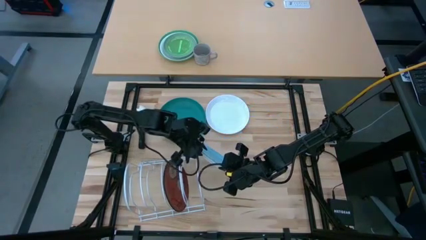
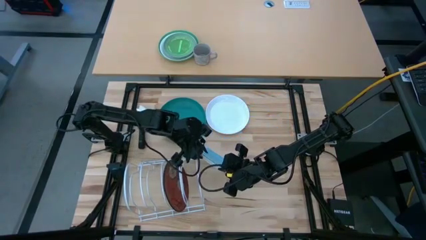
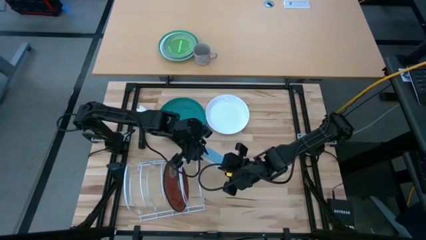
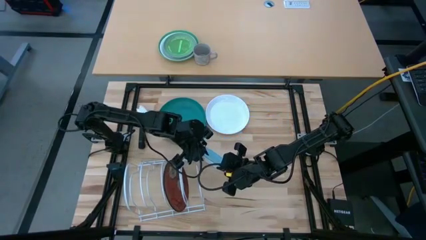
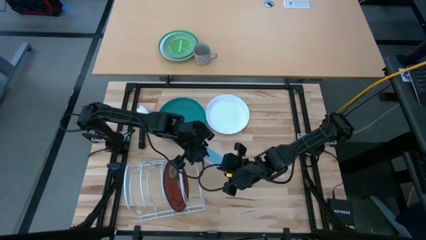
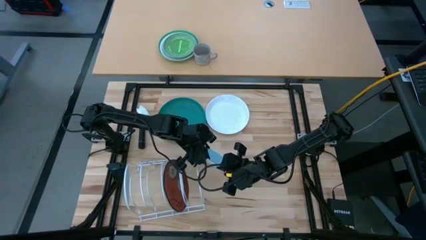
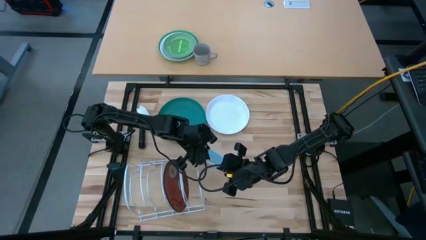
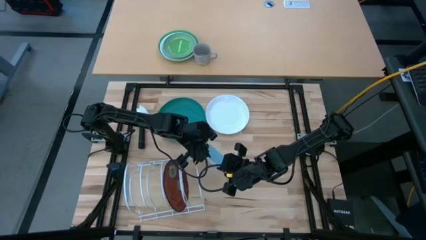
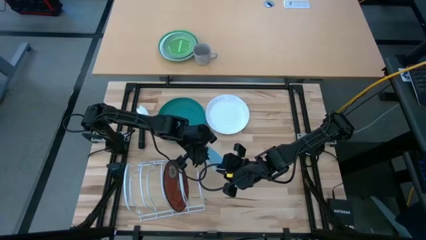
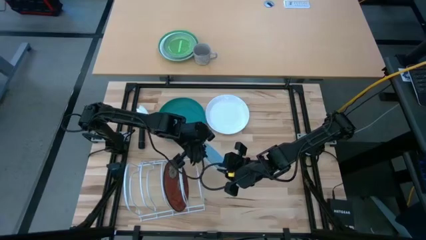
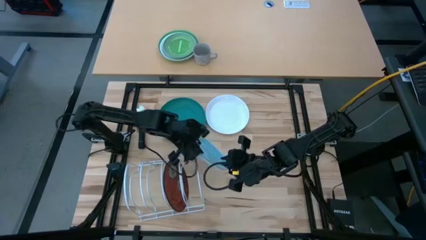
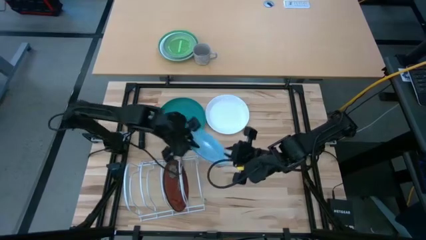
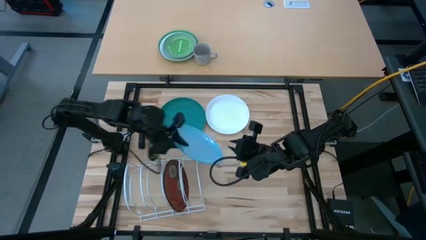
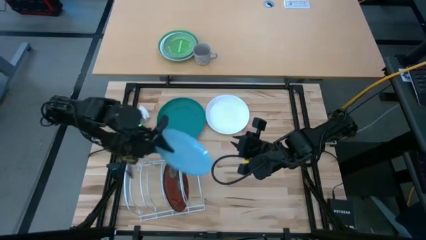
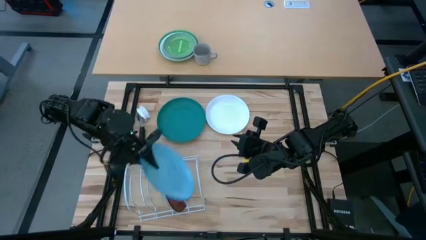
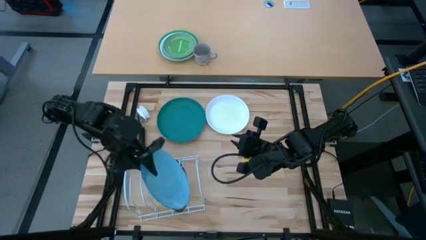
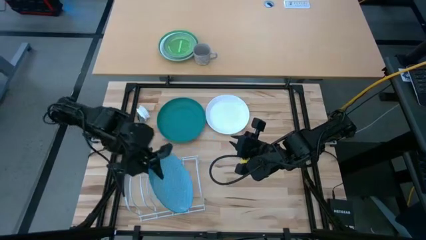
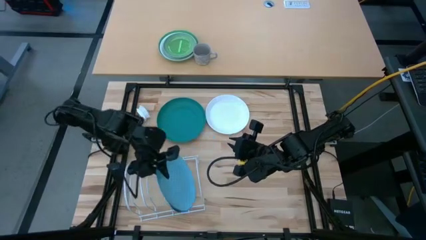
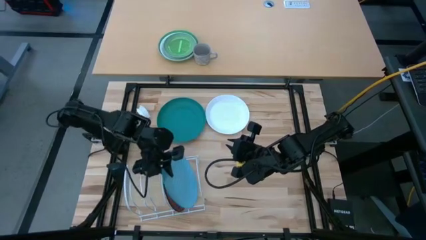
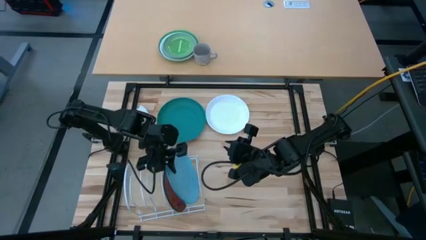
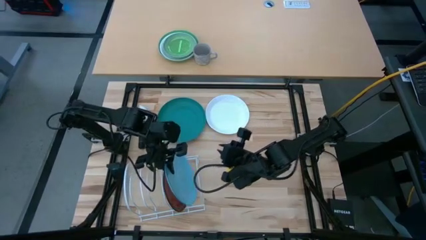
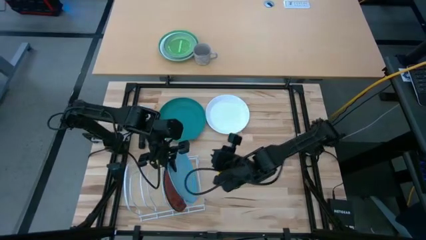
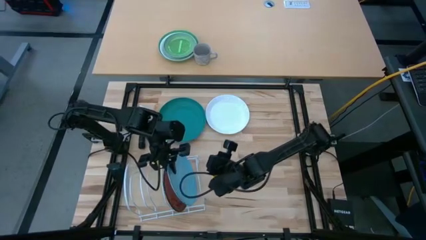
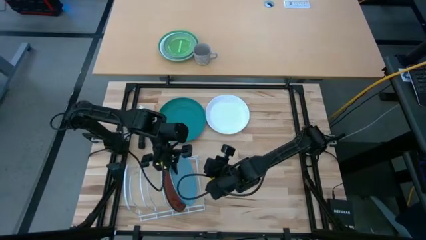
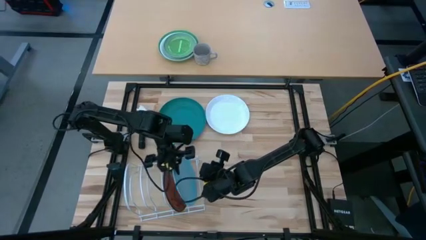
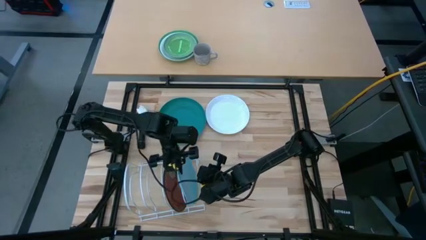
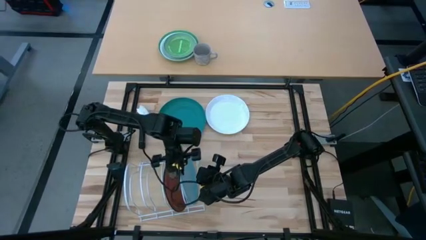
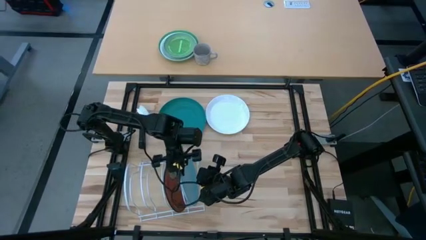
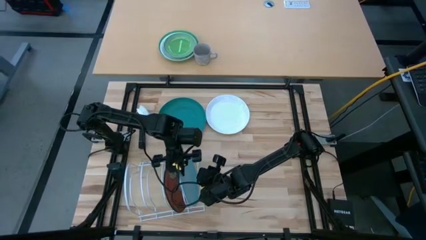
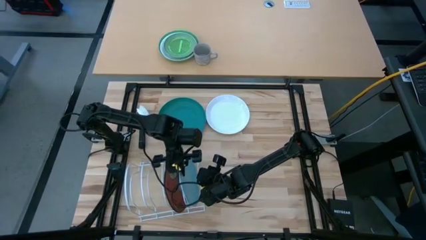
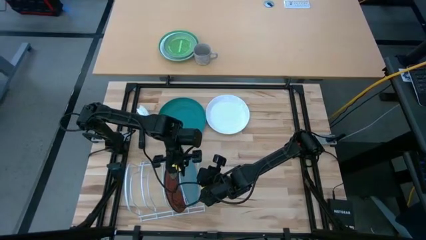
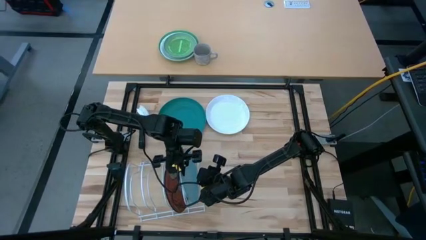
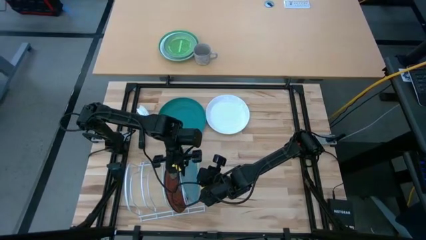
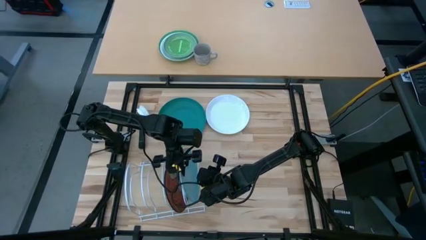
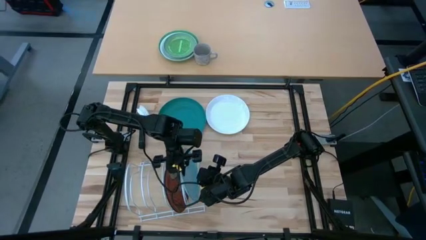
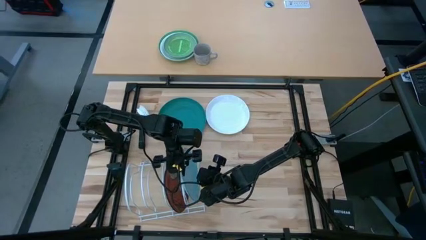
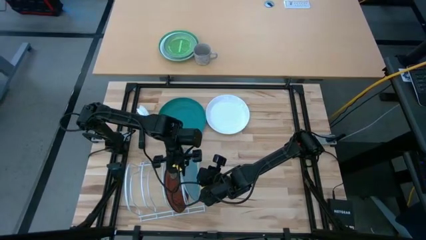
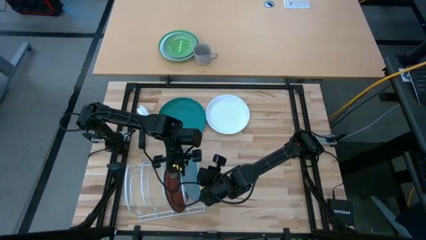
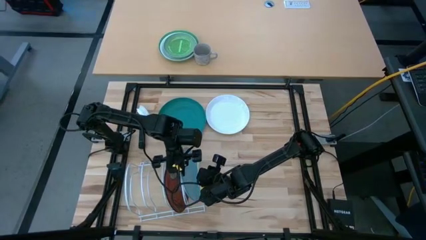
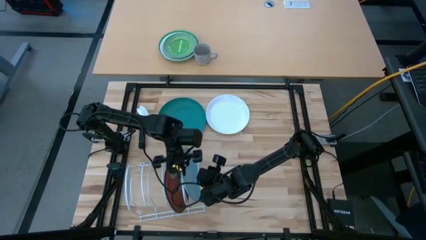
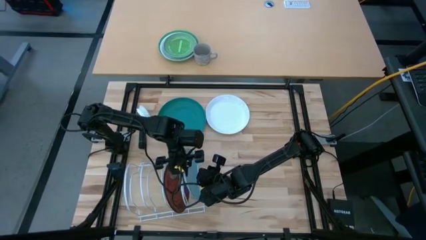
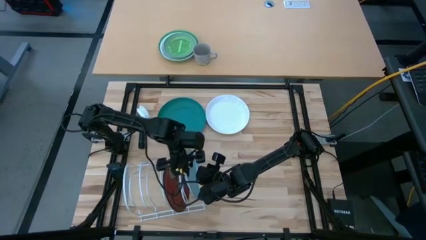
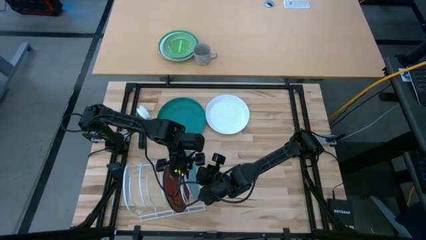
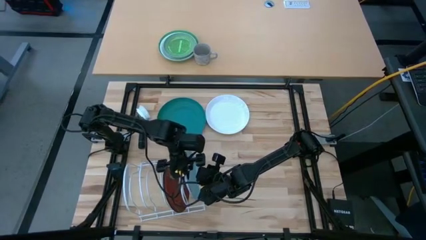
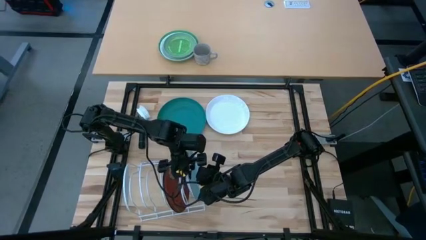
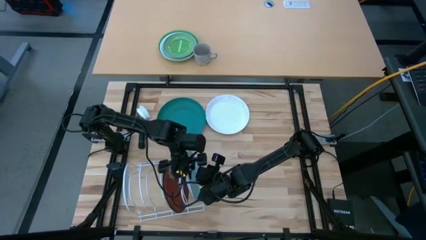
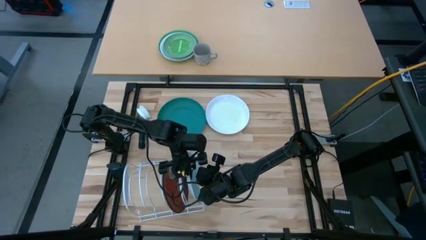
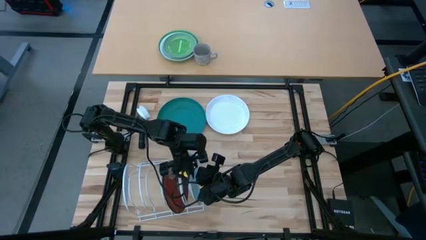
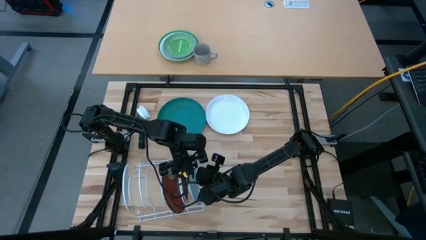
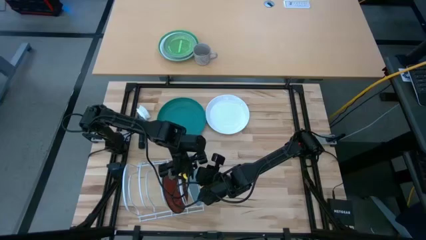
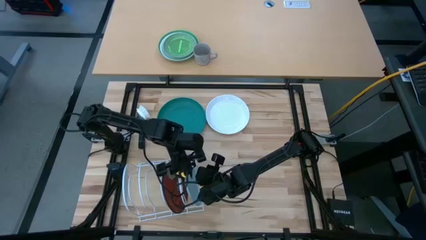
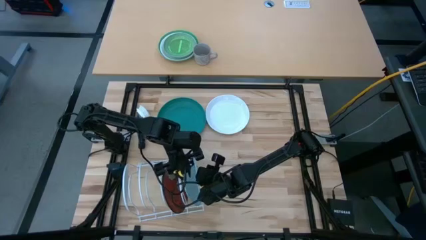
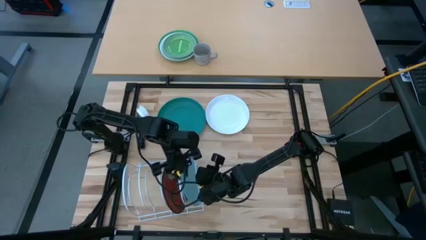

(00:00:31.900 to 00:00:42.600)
Task: Sort dishes
Put the light blue plate into the dish rack

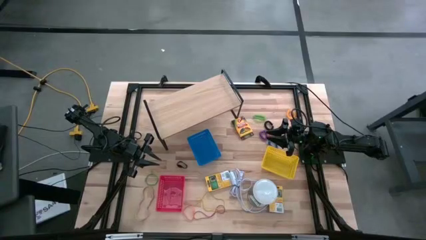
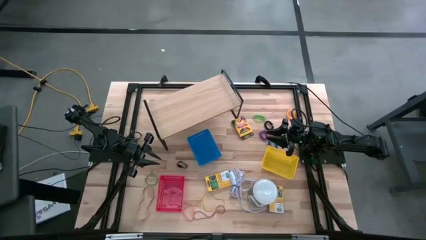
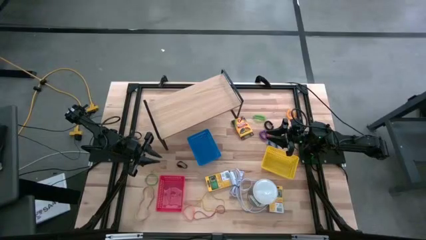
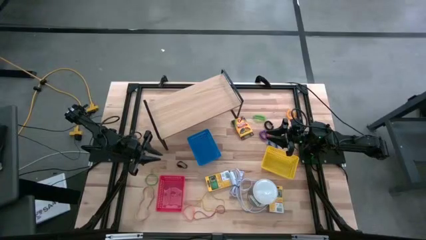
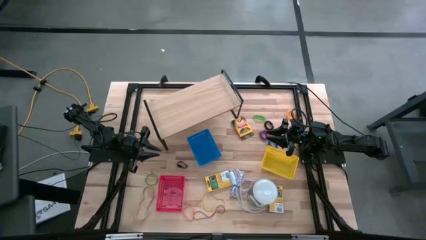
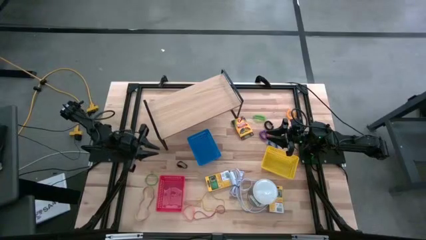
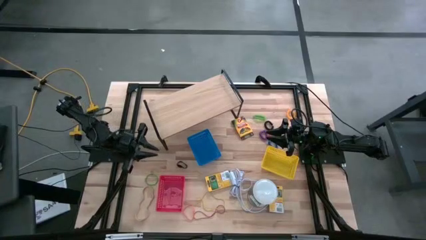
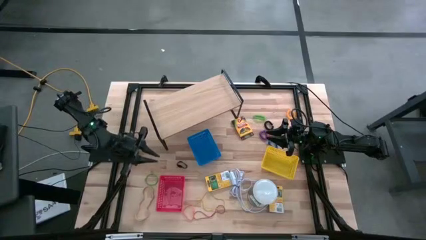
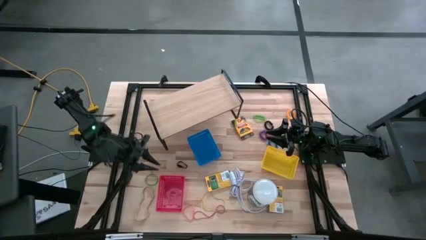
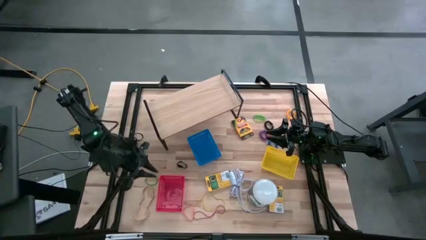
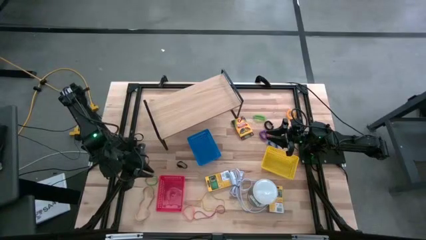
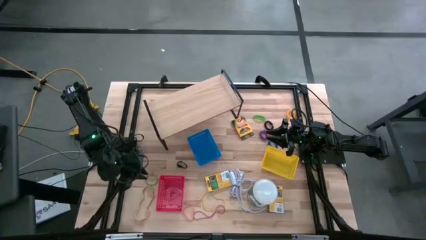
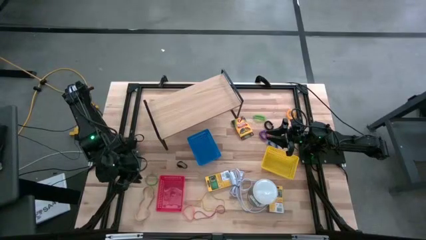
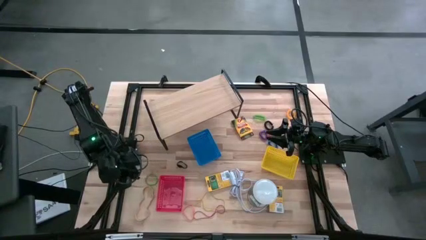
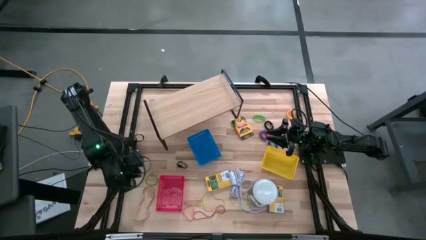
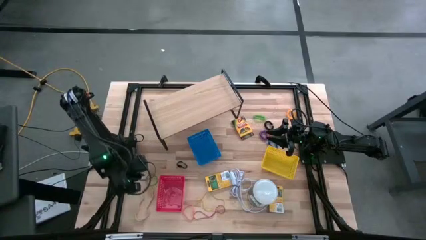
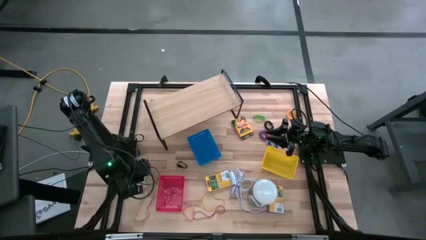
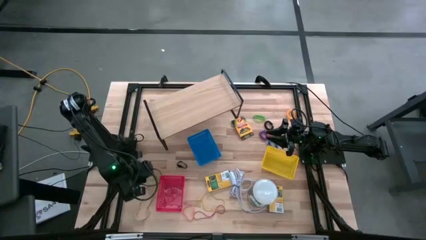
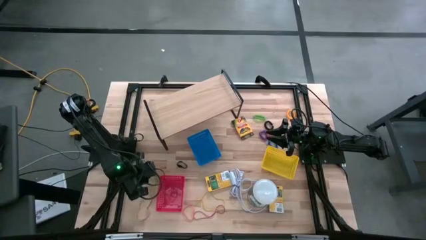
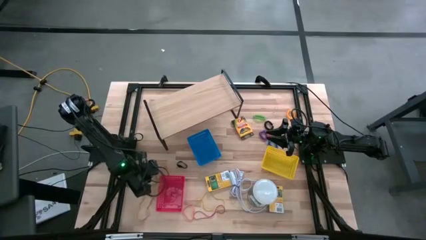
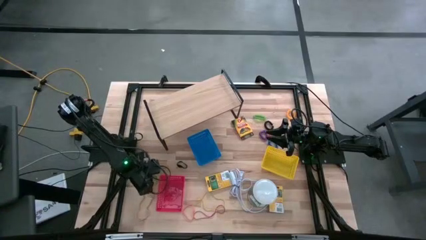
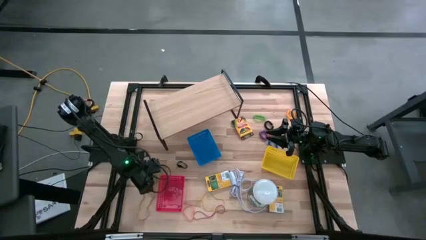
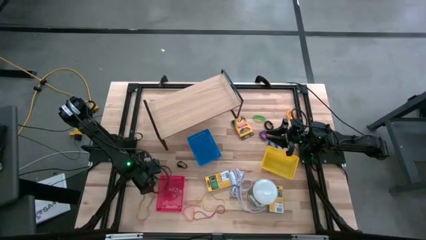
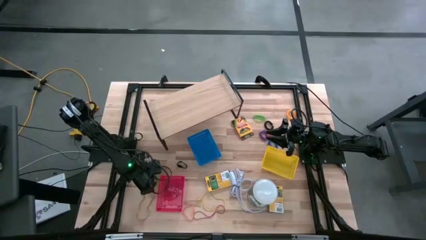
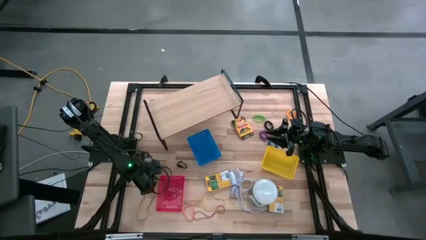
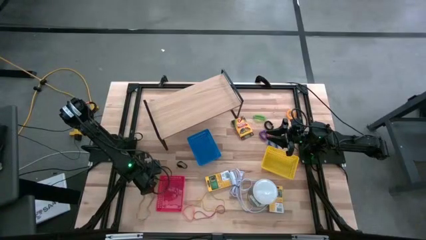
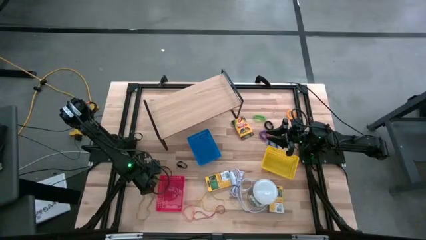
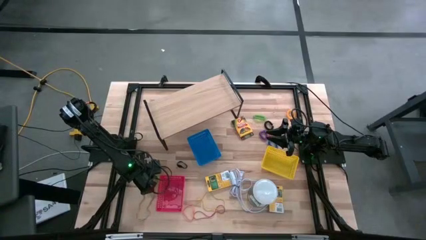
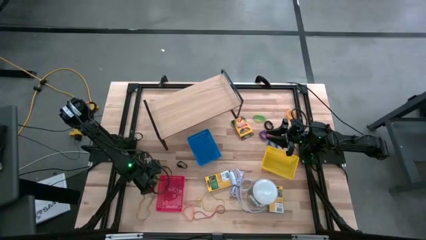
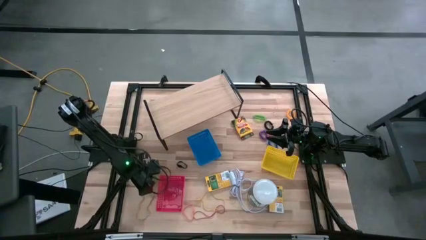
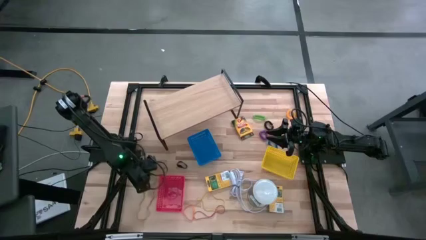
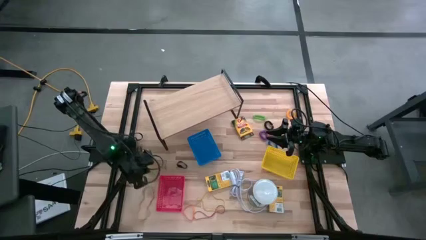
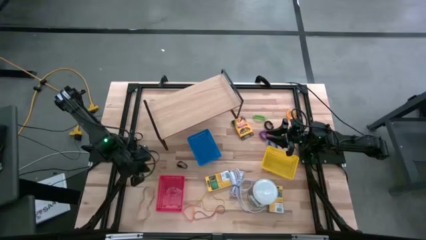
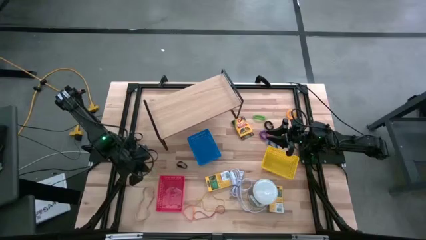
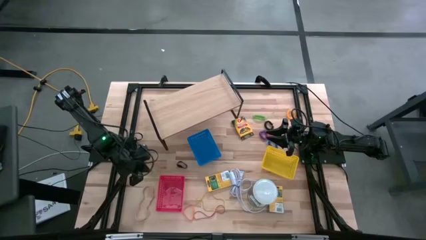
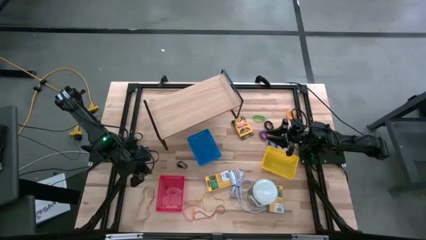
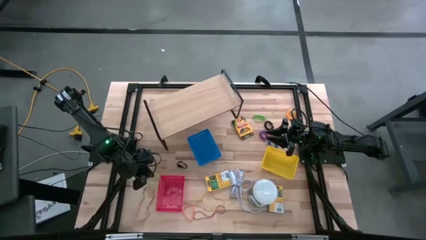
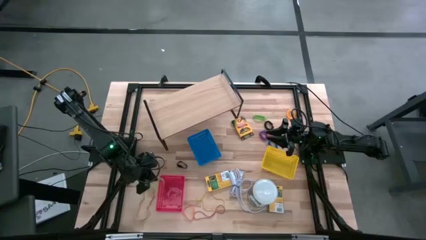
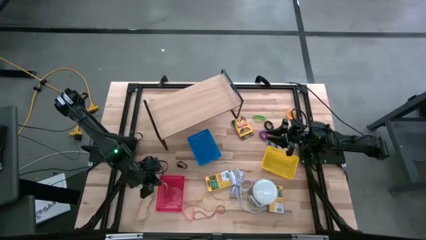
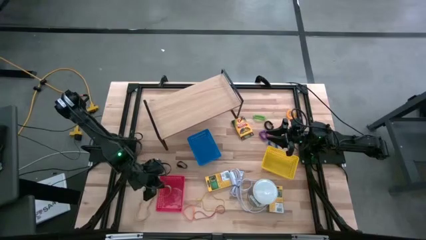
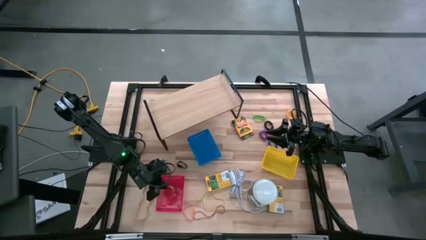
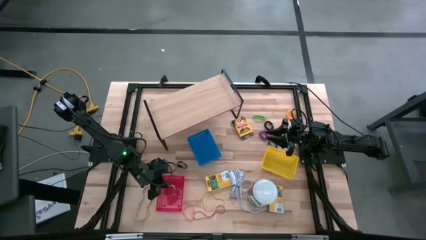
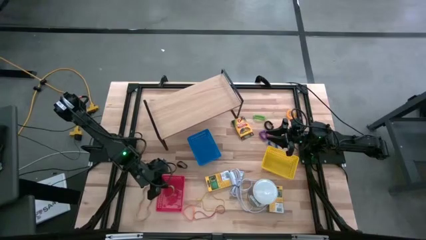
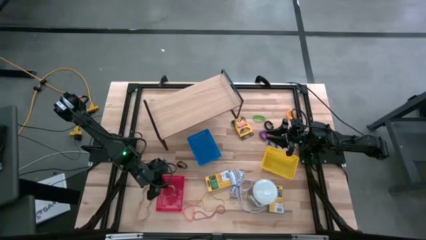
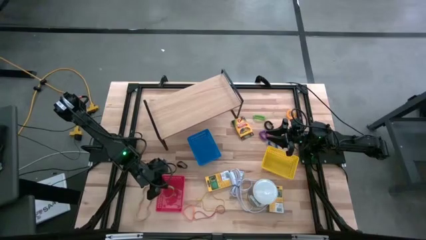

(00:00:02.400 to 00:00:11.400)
Task: Pick & Place Office Desk Supplies
Put the green rubber band into the red bin
